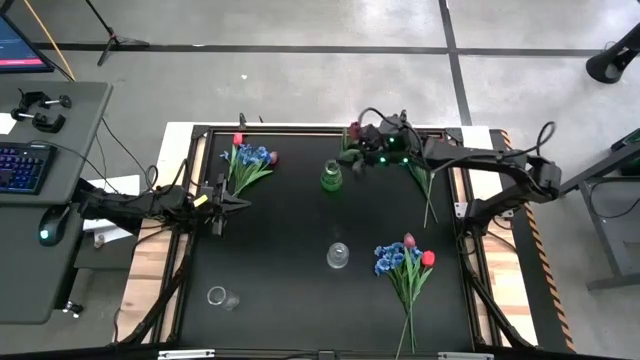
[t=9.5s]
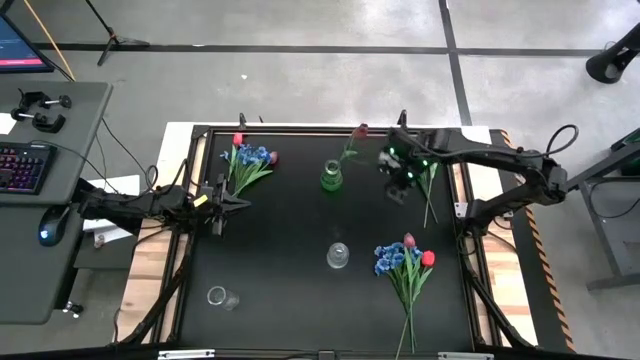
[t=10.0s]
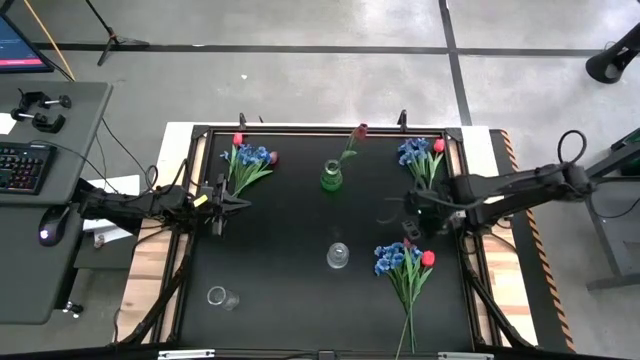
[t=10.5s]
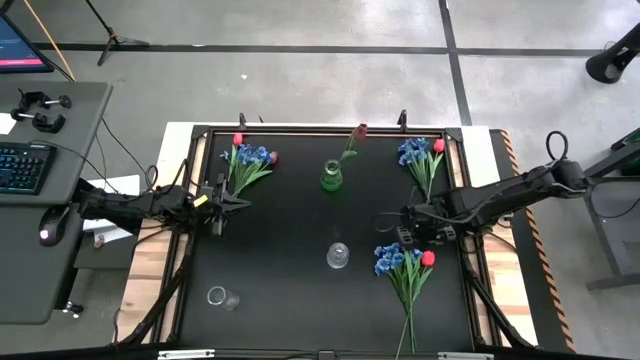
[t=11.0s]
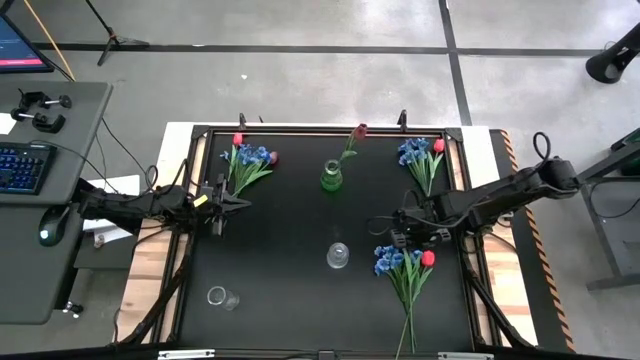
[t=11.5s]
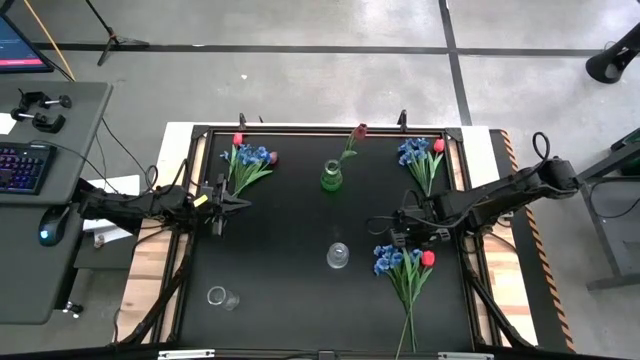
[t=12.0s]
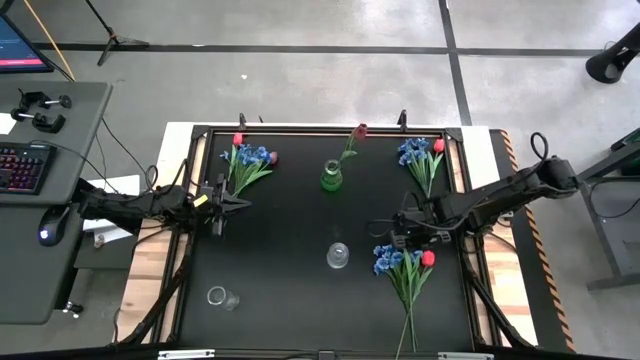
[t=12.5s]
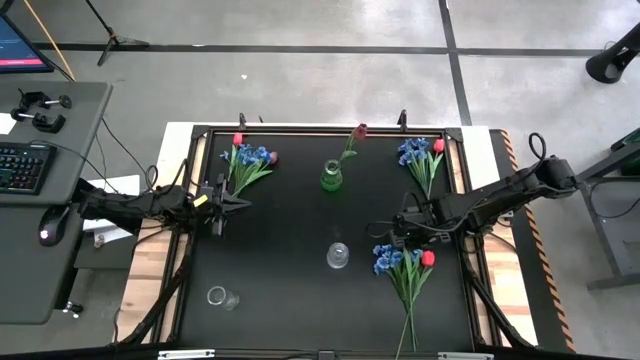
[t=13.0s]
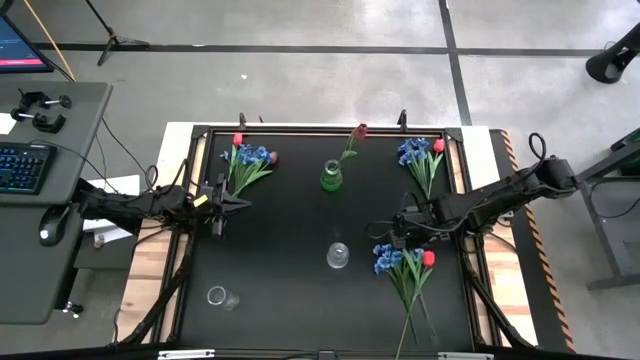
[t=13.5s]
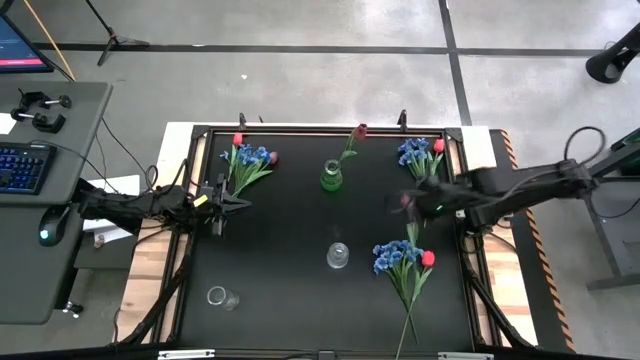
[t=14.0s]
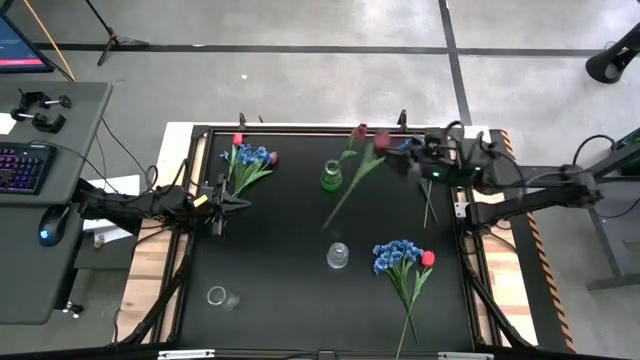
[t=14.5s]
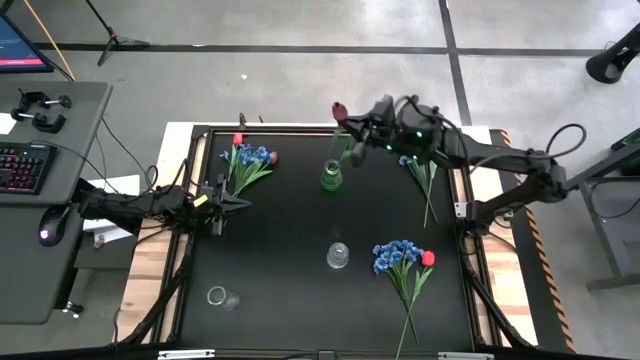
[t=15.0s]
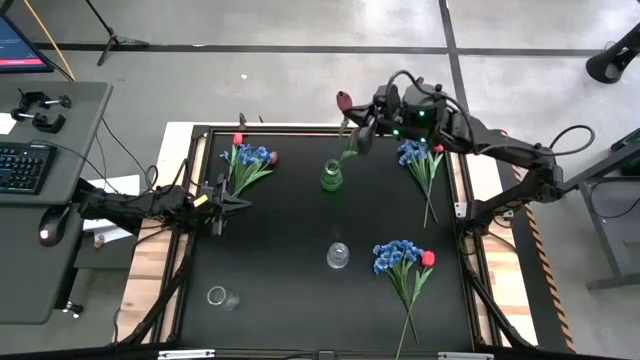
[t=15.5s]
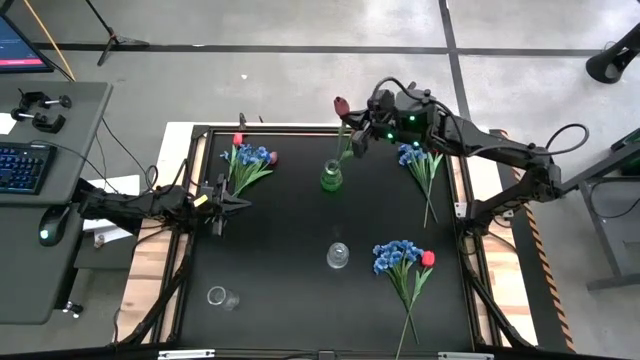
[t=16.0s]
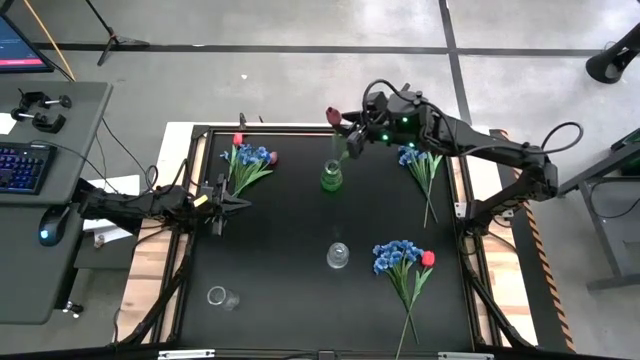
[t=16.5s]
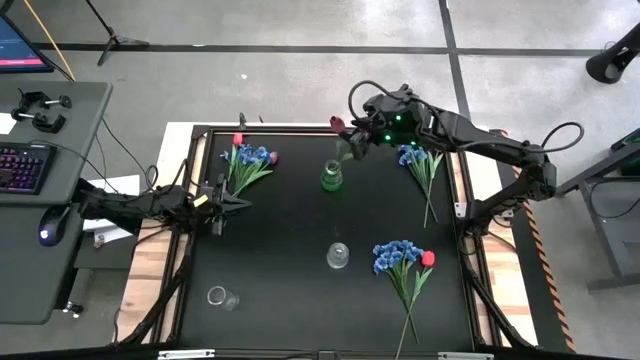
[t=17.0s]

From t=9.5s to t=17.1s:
Task: Sort flowers into vase by color
Put the bottom dark red tulip into the green vase

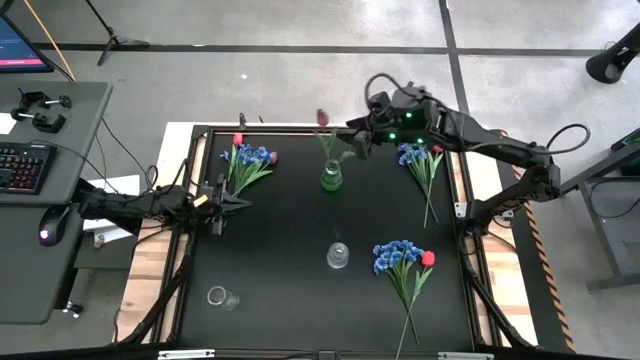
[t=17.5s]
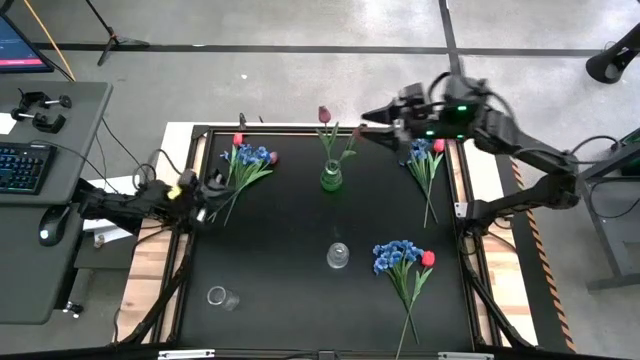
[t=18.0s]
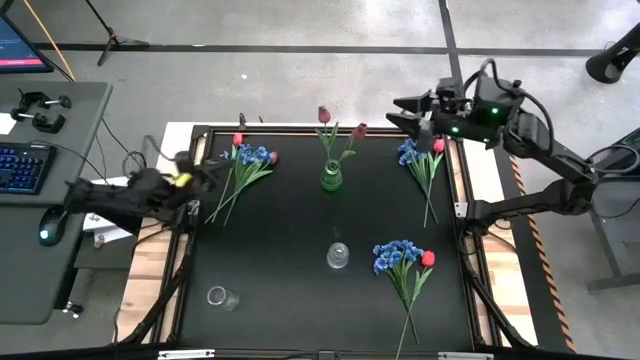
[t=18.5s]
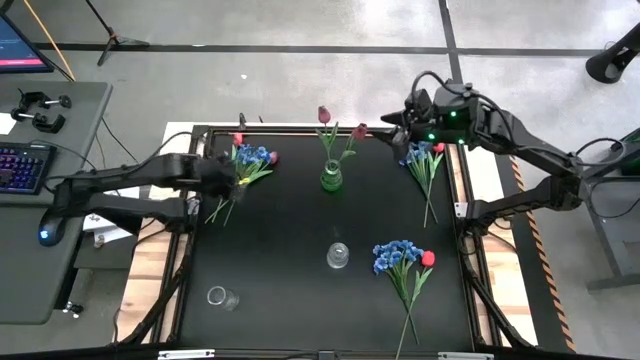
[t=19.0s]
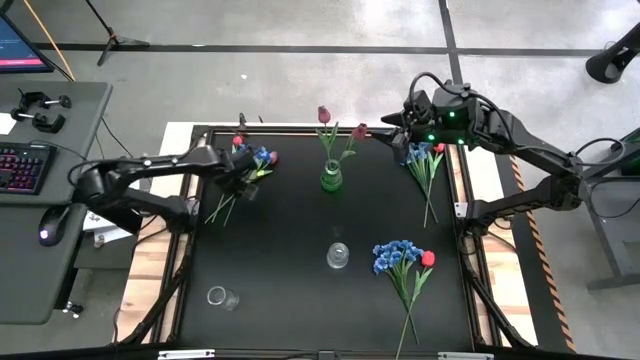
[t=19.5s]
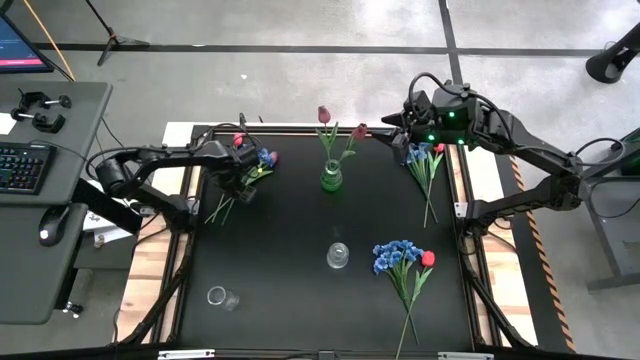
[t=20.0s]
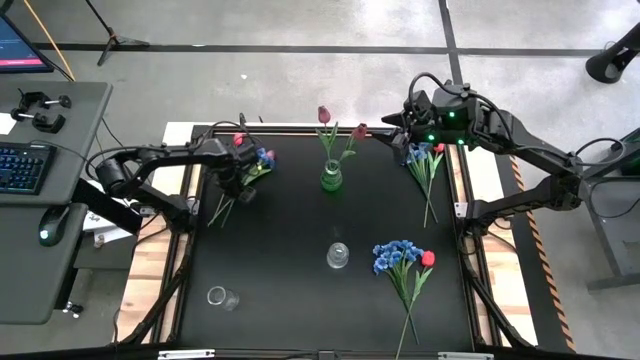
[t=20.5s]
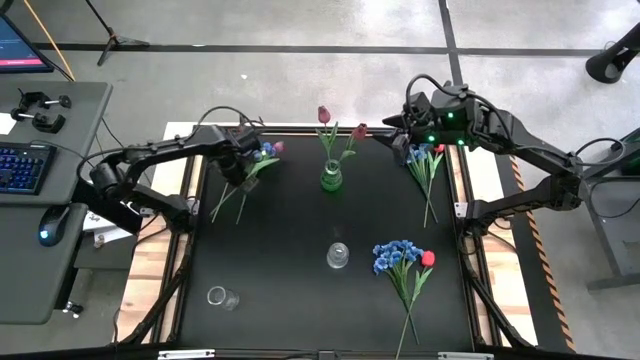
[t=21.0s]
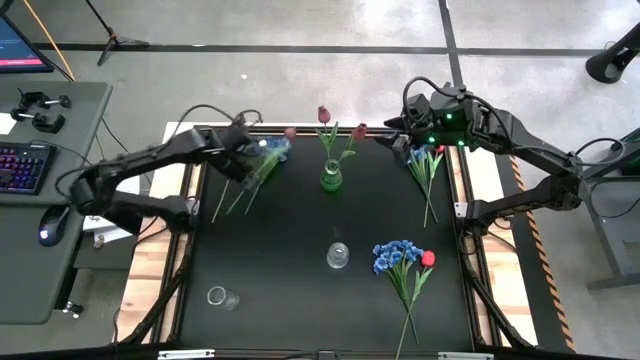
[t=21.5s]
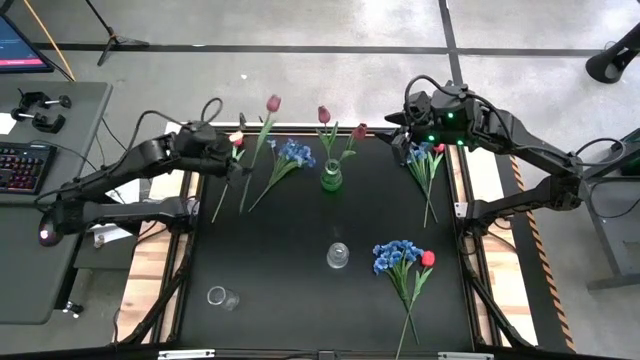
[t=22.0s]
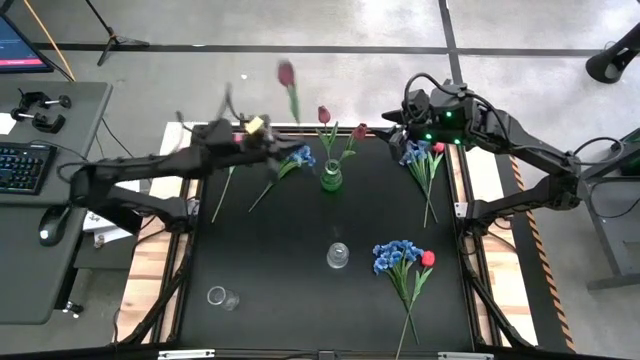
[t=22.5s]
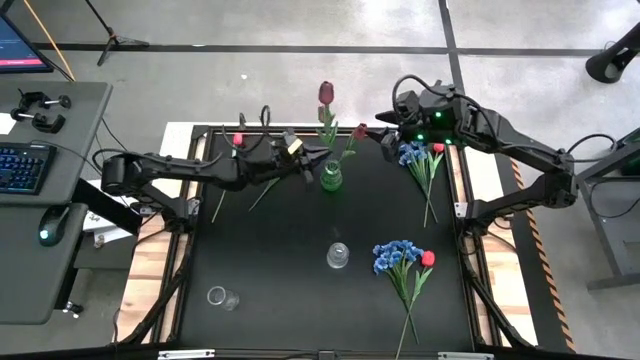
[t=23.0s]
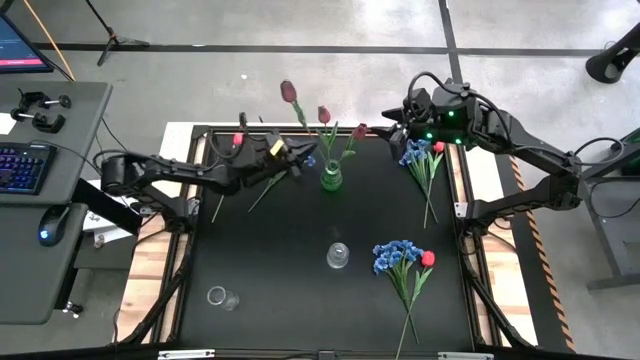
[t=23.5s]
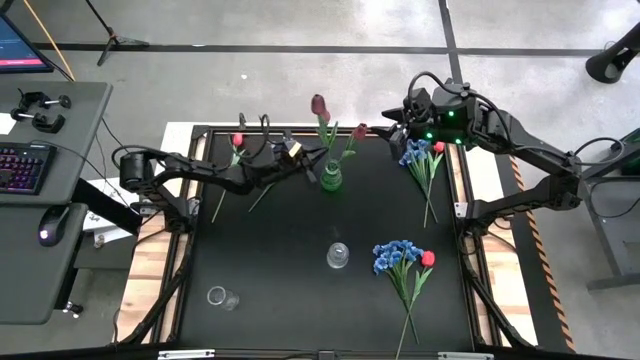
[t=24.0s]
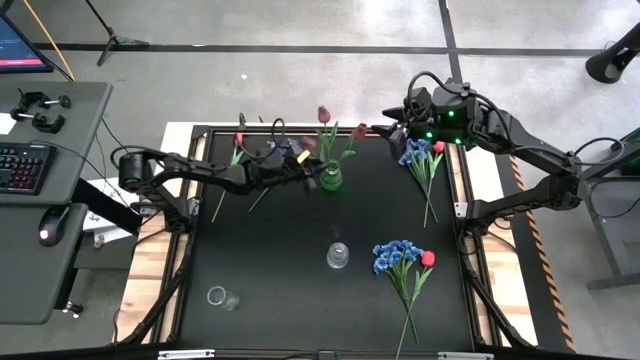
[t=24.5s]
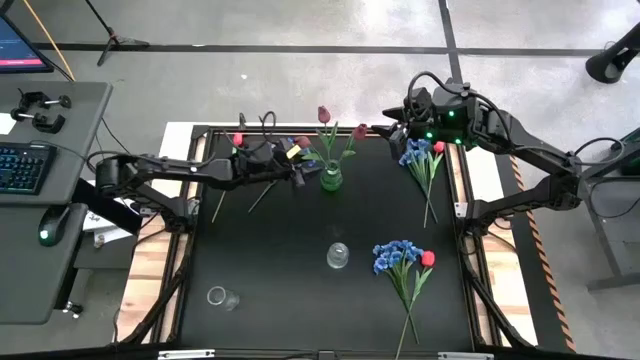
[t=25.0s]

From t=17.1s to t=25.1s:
Put the dark red tulip into the green vase

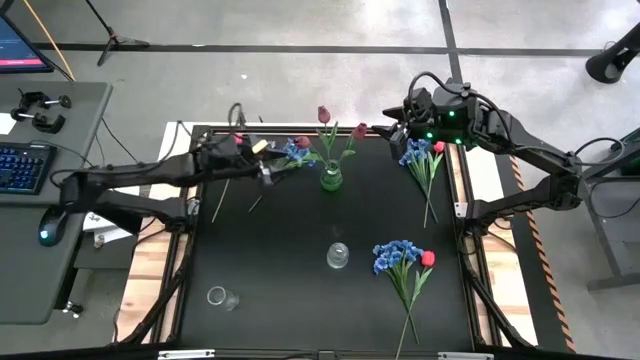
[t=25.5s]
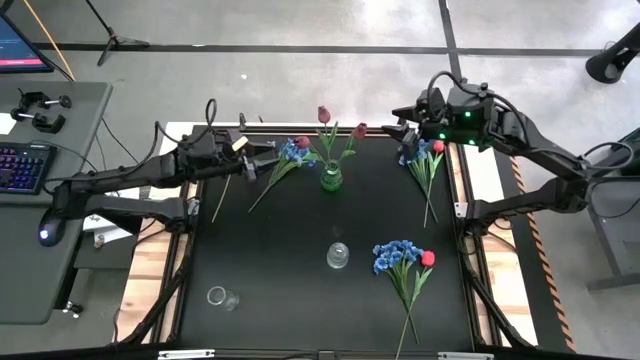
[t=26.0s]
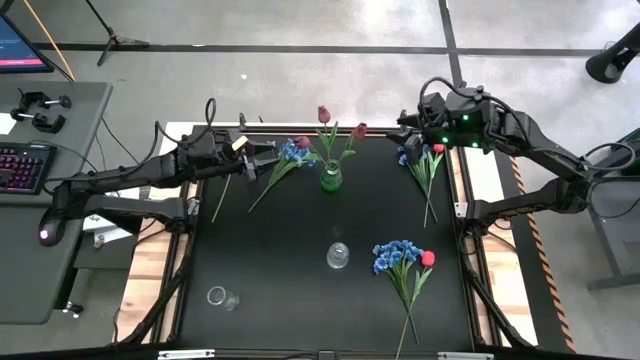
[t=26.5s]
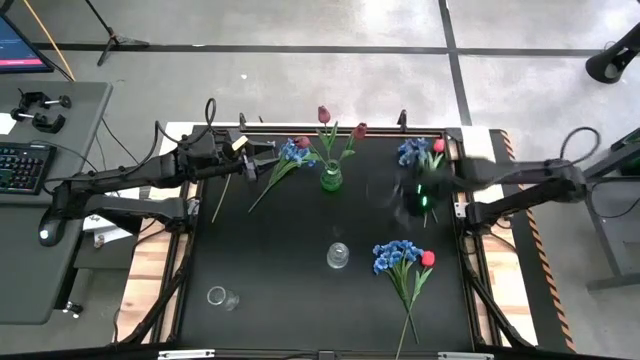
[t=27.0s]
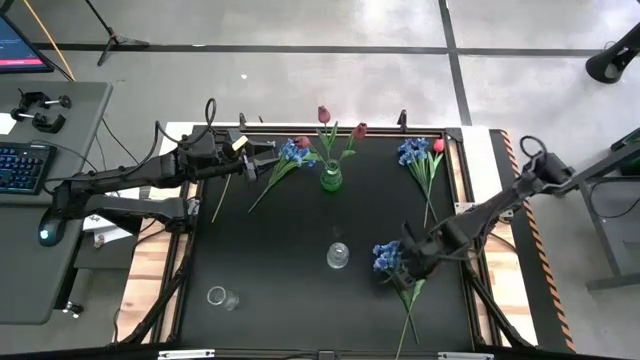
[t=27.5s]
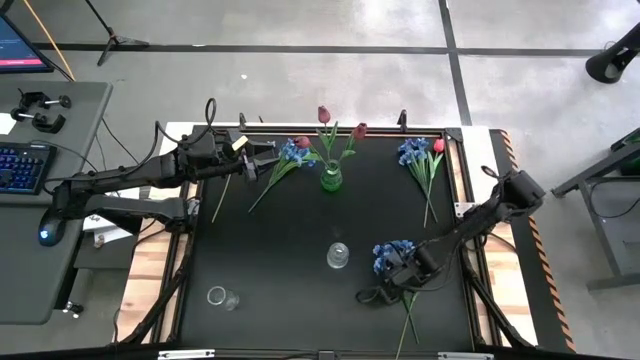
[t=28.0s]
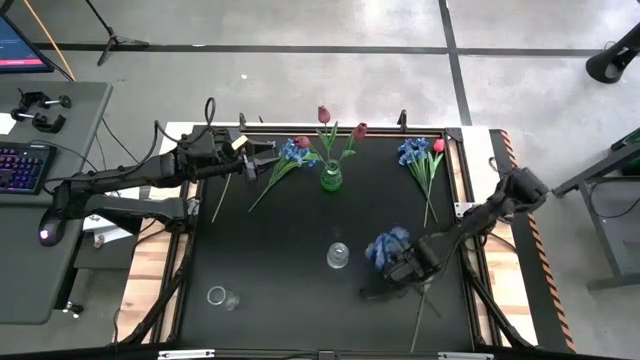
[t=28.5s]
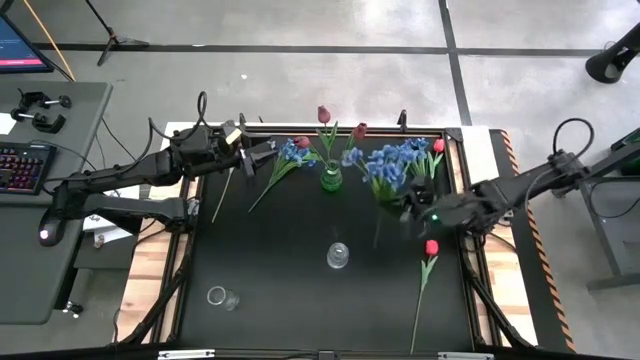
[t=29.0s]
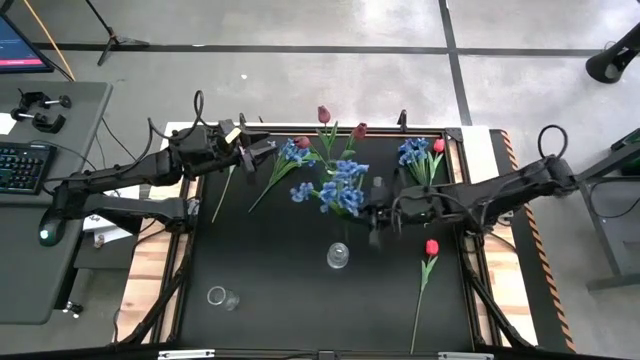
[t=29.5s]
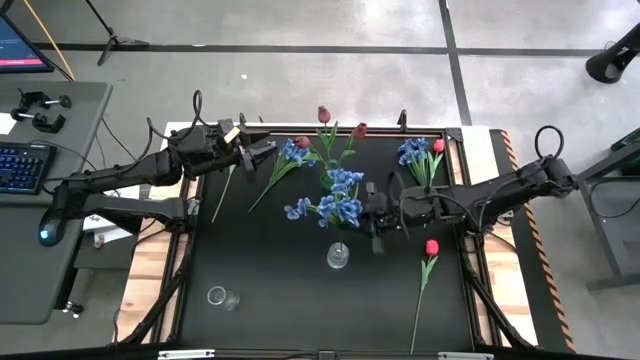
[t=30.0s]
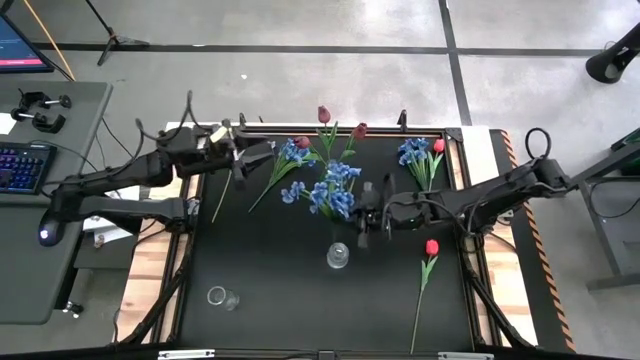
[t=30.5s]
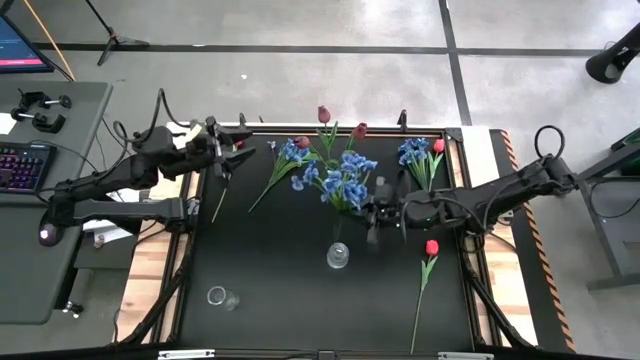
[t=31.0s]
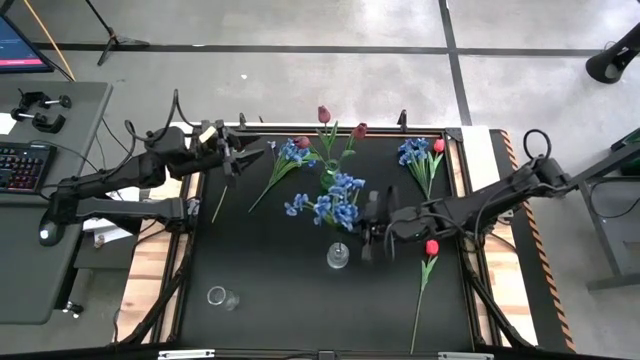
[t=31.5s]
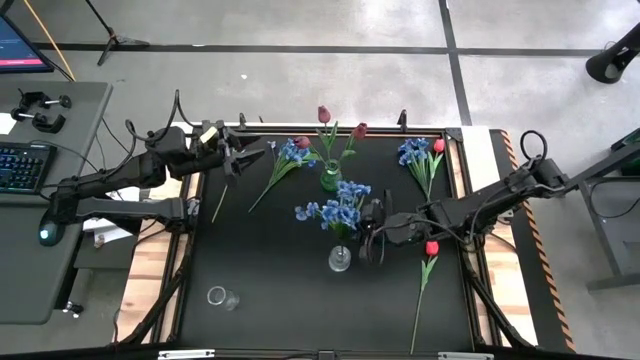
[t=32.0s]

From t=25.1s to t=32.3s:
Put the bottom blue flowers into the right transparent vase
